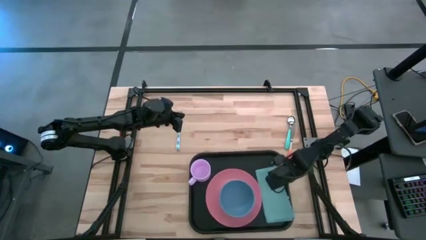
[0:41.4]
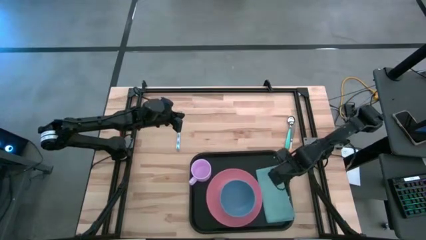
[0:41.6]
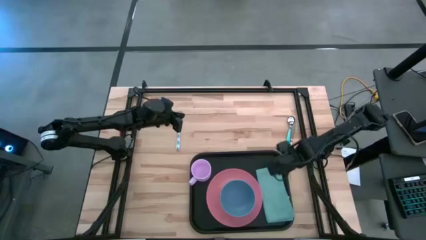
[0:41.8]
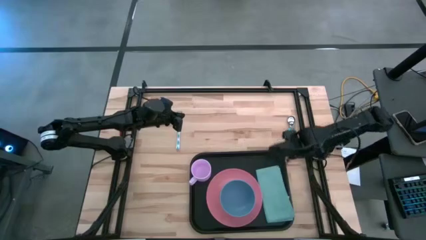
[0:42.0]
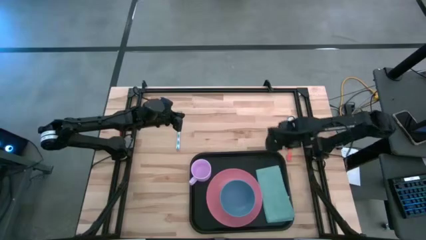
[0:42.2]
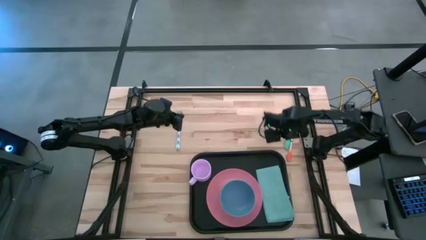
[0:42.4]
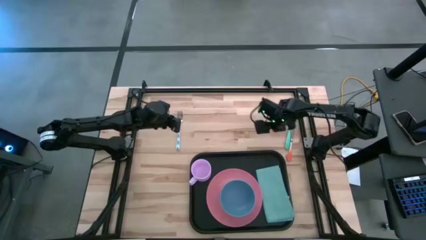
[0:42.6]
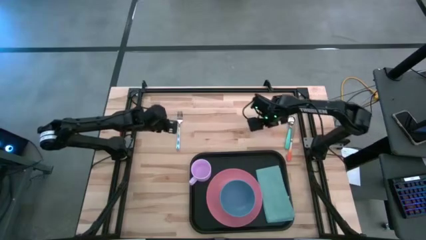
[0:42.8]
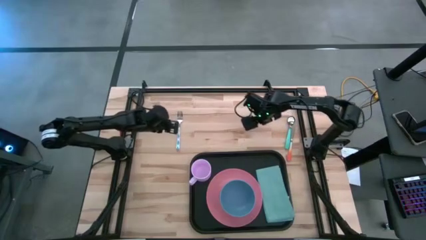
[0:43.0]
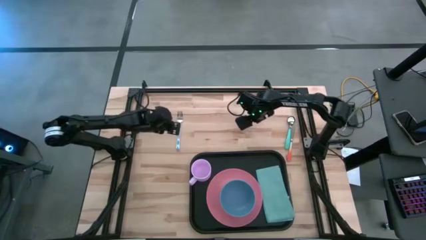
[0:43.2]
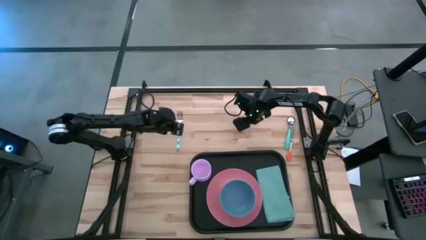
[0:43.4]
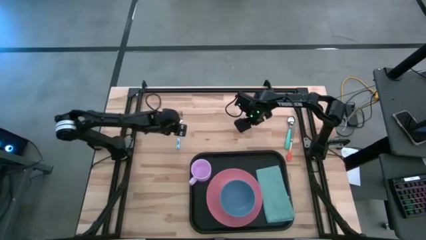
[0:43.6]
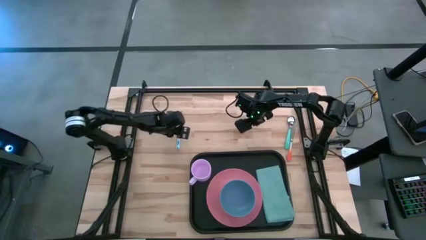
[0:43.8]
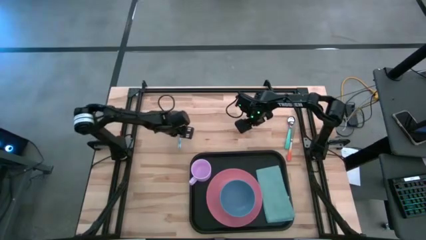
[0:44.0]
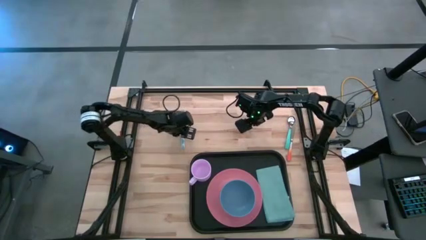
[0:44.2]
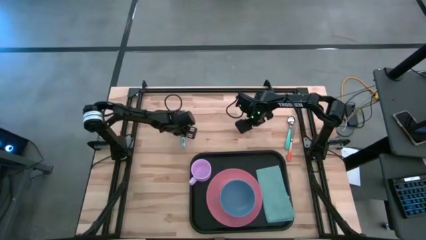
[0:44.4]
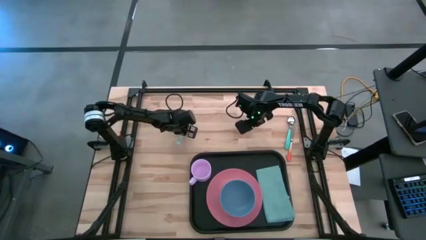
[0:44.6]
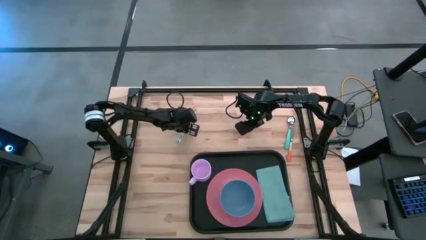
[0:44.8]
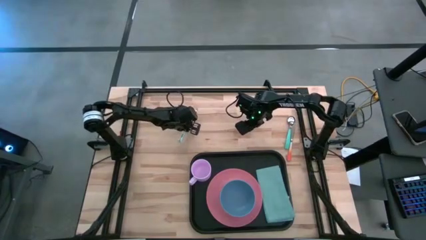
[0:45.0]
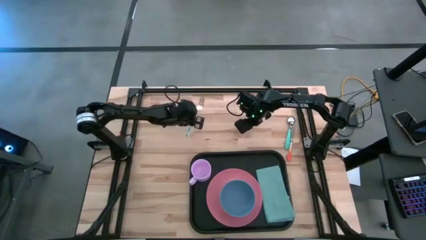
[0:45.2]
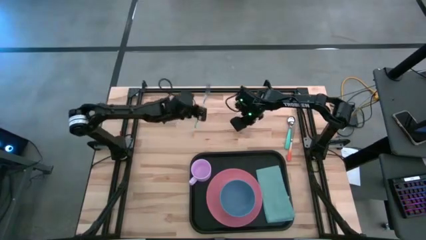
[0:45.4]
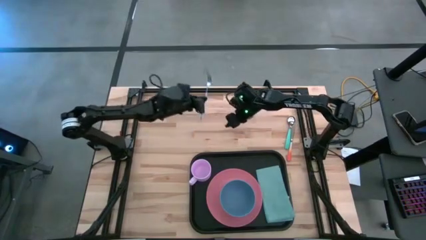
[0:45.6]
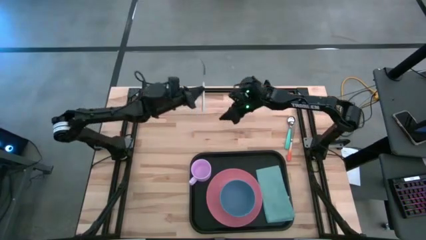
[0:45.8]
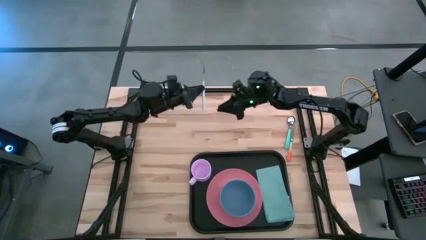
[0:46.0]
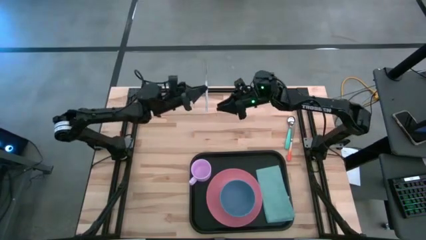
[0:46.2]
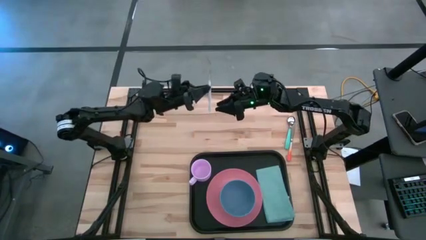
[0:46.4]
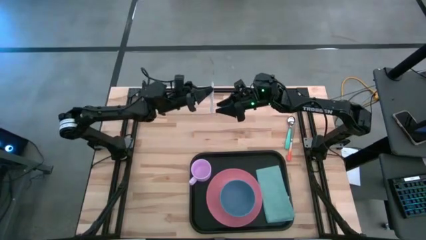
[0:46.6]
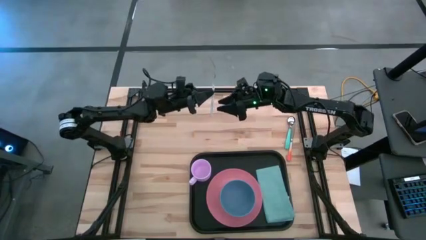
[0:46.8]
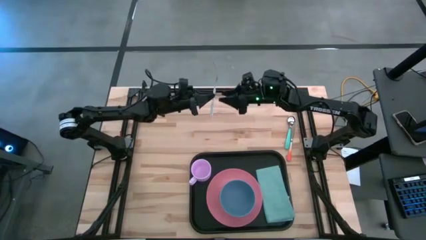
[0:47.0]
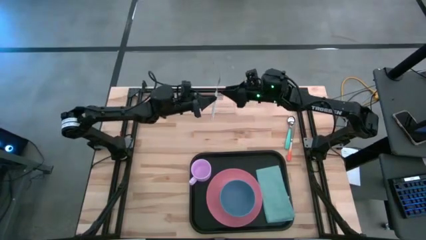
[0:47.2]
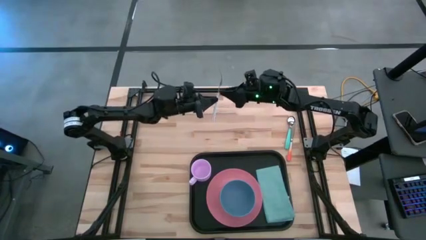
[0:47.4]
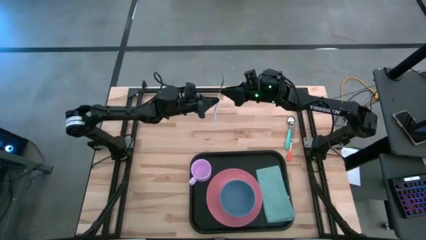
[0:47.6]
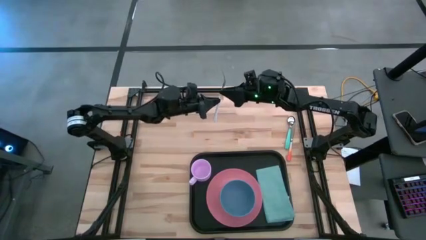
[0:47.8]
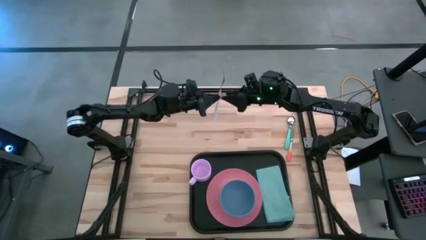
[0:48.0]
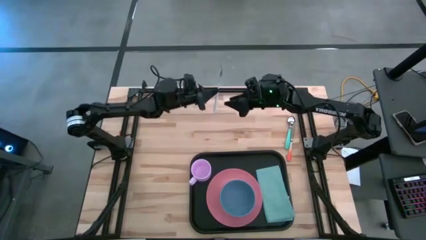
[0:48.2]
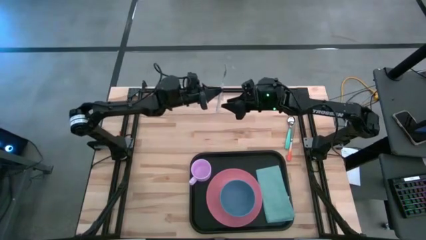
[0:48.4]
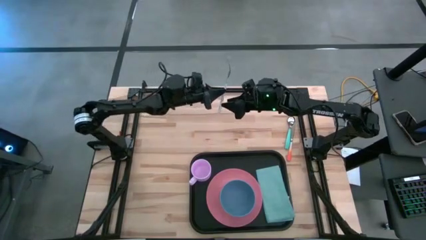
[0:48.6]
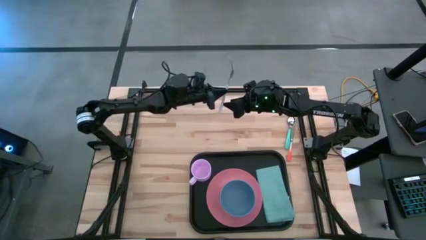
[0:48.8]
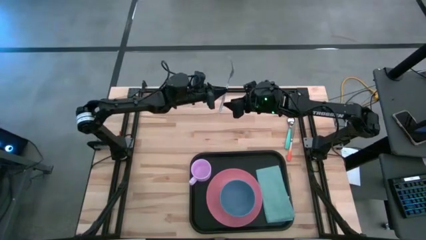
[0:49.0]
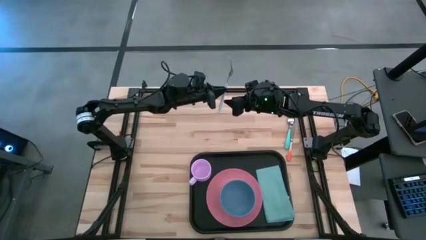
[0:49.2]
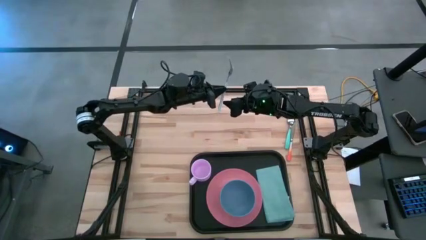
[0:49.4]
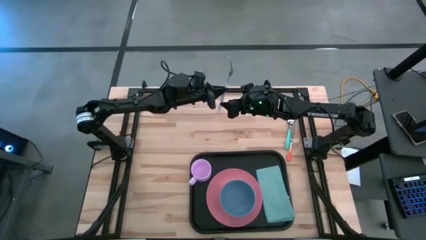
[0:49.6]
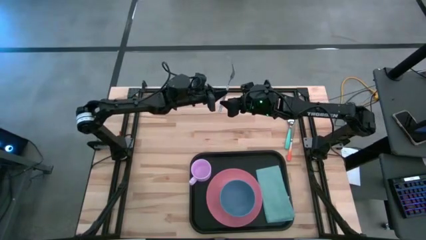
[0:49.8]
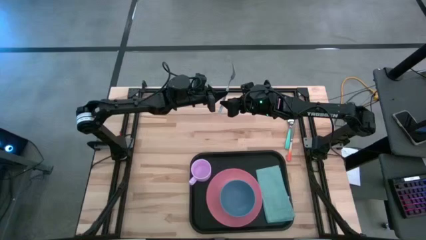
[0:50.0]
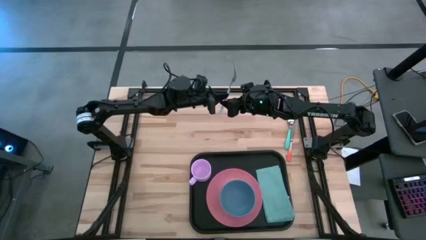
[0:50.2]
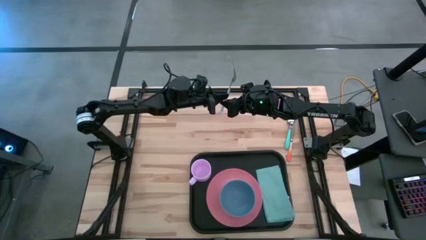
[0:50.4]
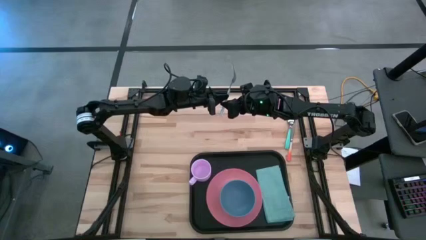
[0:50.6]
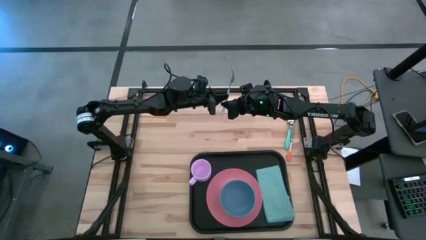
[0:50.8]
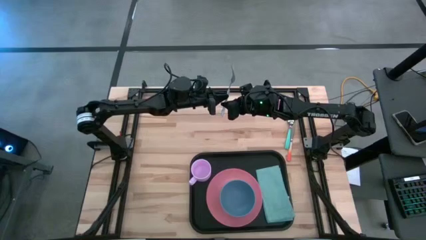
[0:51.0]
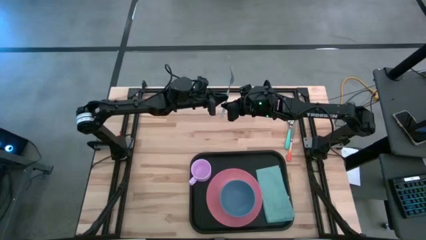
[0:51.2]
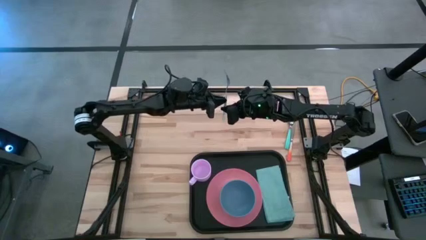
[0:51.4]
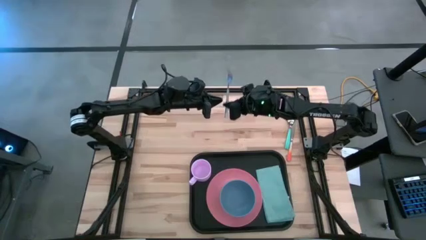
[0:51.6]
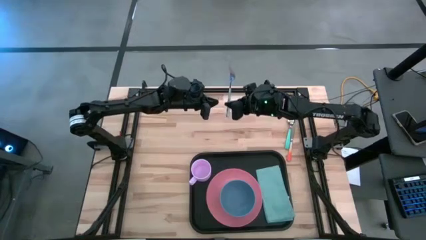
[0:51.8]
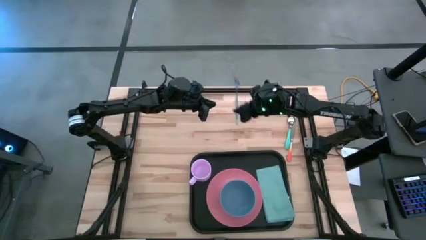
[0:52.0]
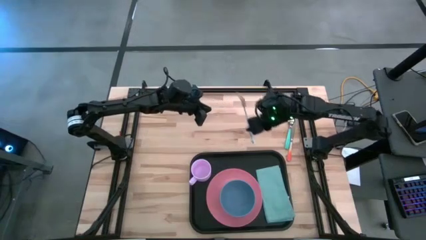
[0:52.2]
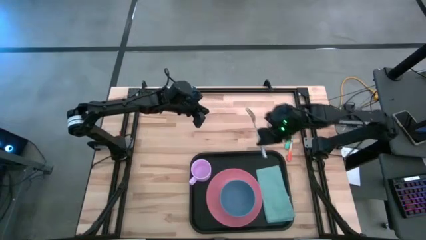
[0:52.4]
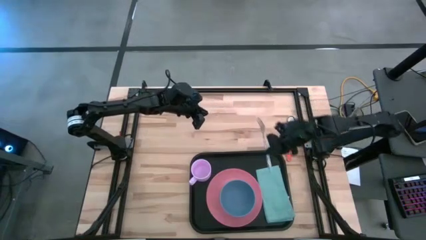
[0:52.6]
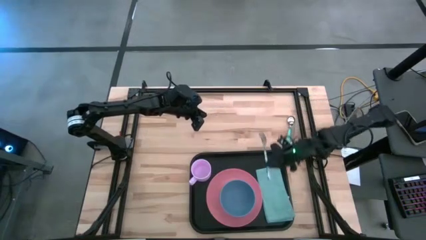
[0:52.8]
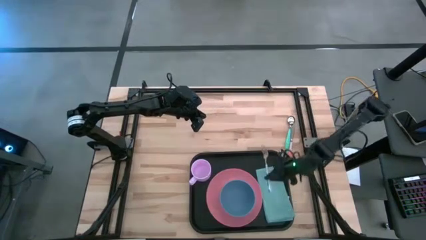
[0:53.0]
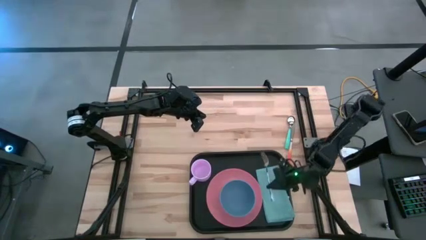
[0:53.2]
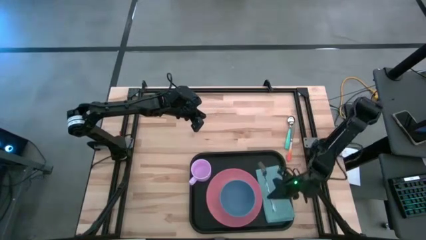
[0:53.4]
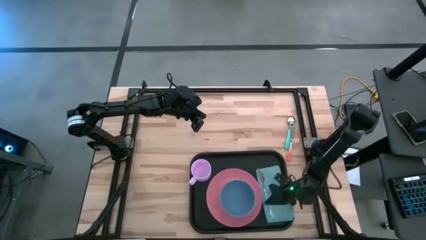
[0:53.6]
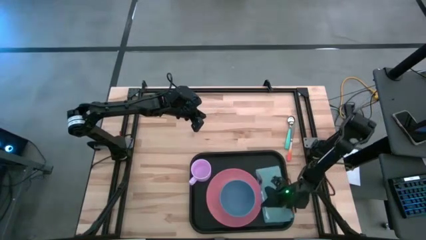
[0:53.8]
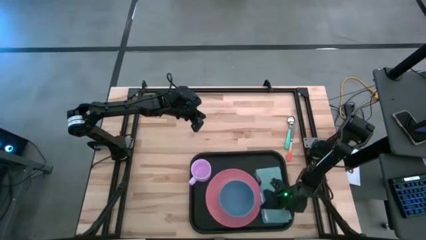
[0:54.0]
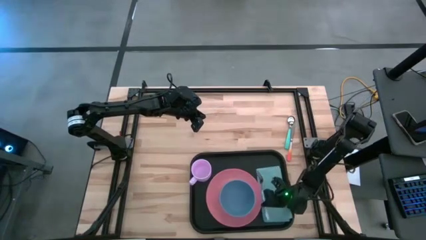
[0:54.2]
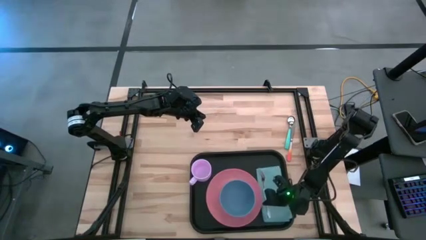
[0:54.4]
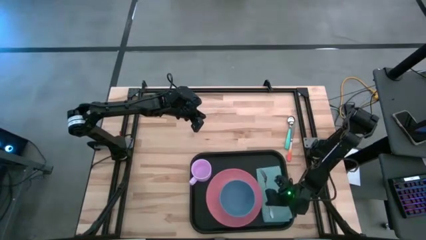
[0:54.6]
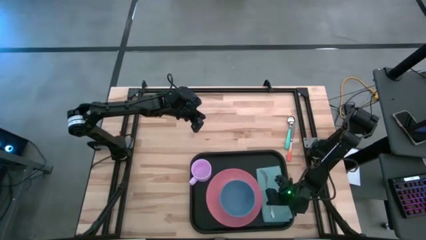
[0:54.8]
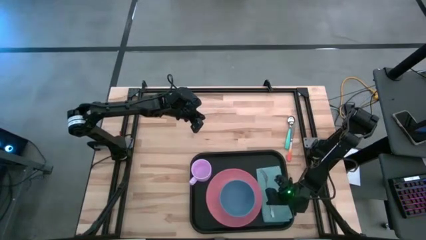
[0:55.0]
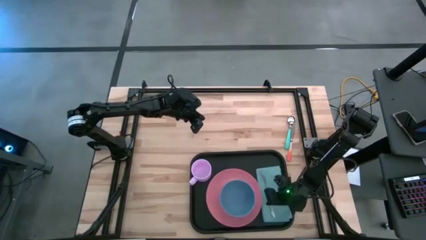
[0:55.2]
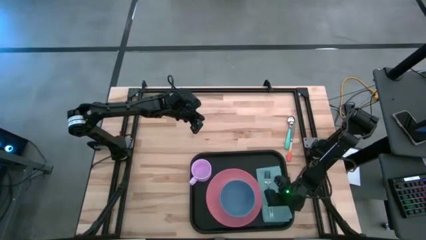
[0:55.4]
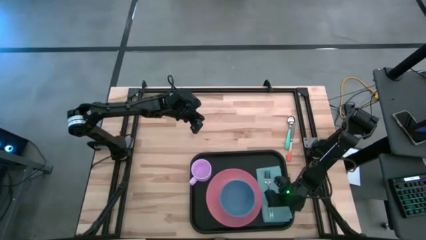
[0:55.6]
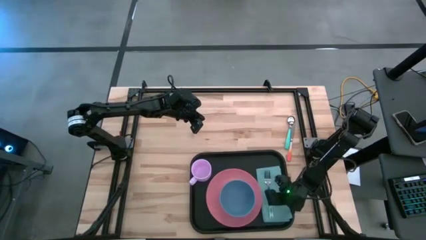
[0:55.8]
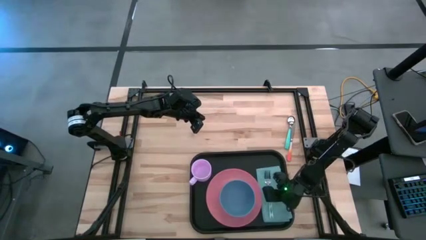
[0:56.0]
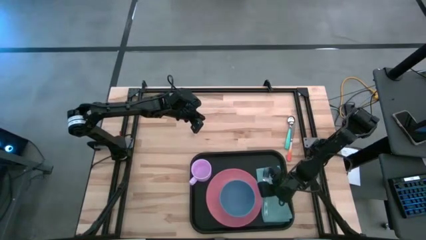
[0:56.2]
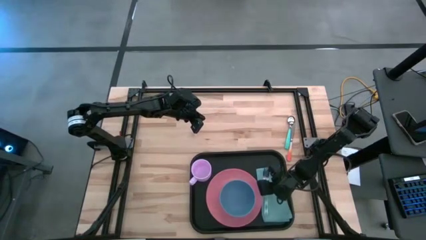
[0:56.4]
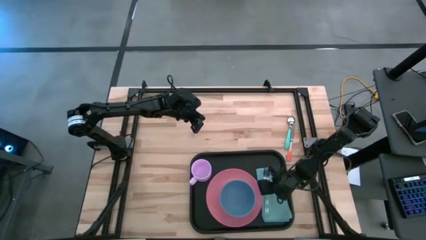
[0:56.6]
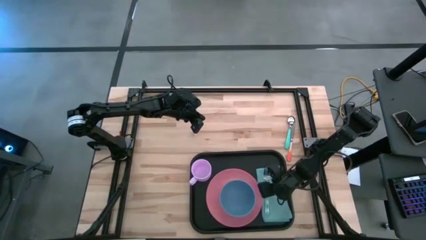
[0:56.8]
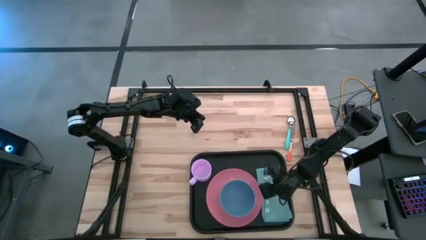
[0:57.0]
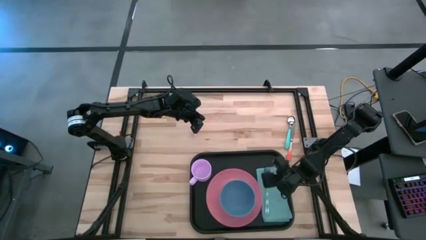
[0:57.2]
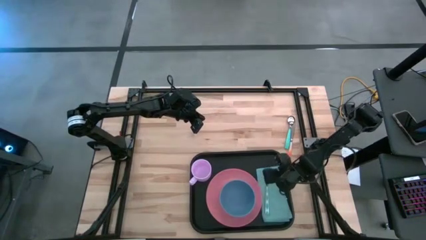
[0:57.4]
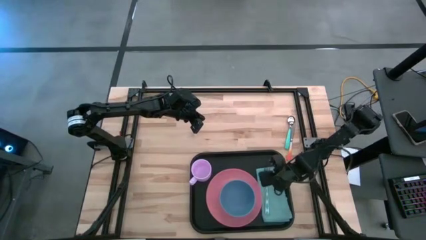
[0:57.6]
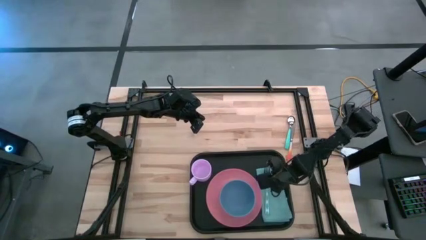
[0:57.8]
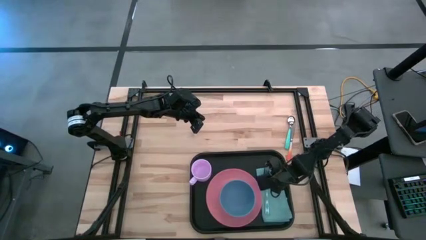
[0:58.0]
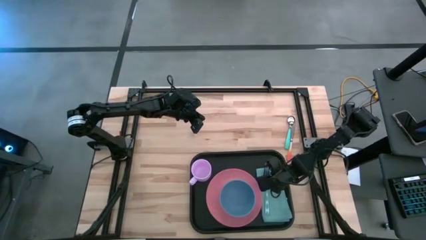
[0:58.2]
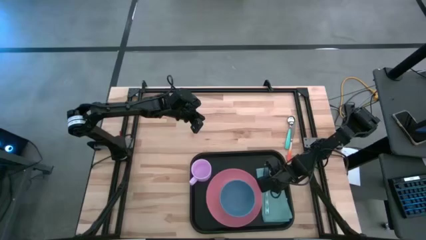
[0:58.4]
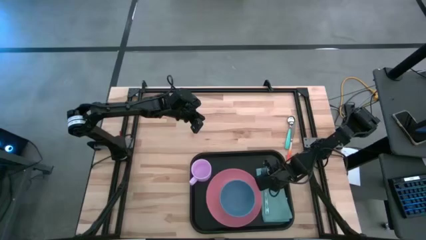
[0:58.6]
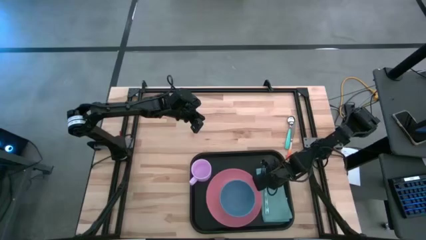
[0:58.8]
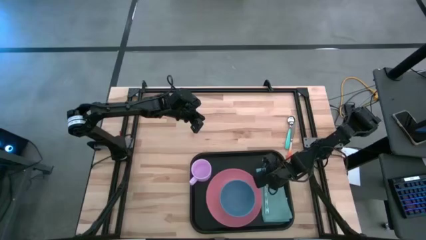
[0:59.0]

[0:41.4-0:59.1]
Task: Set up tray
Put the white patterned fork on the blue napkin
